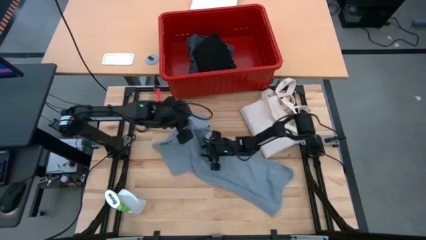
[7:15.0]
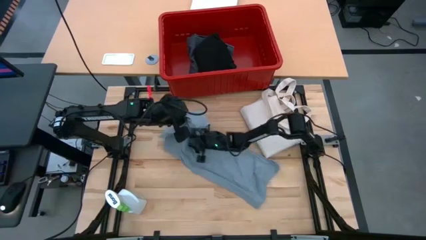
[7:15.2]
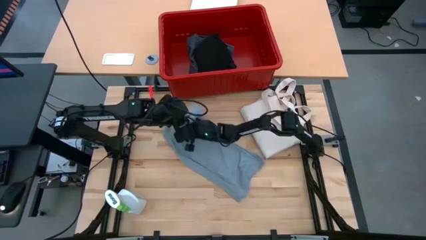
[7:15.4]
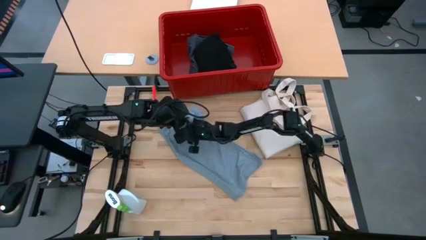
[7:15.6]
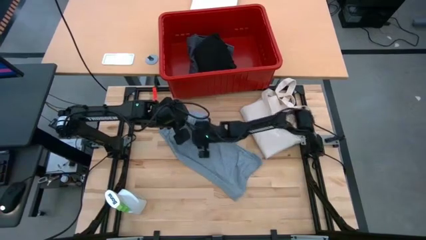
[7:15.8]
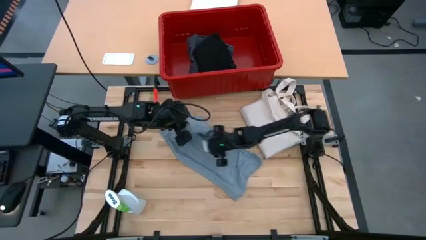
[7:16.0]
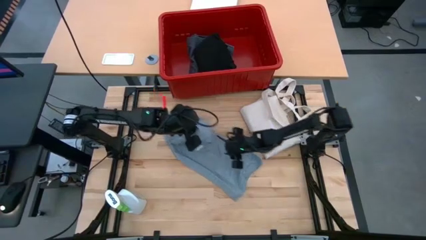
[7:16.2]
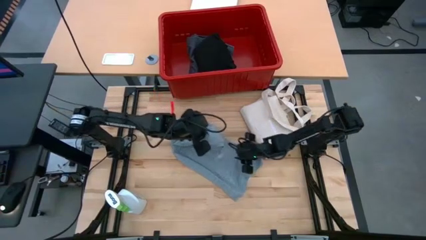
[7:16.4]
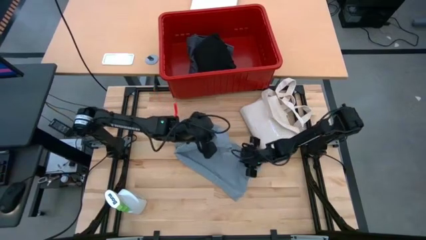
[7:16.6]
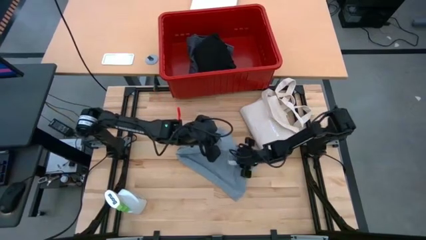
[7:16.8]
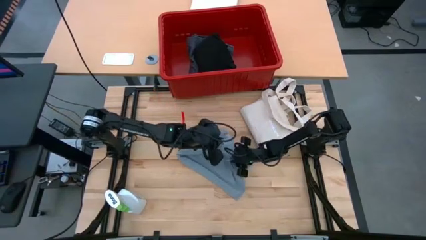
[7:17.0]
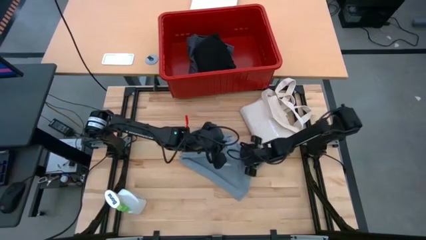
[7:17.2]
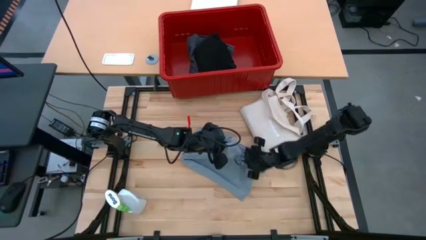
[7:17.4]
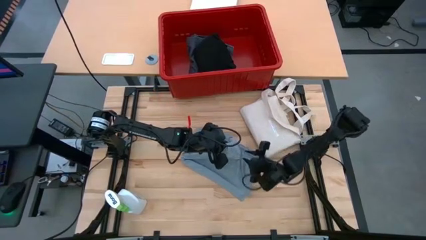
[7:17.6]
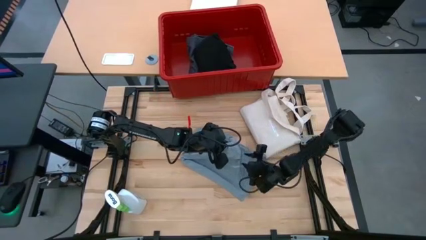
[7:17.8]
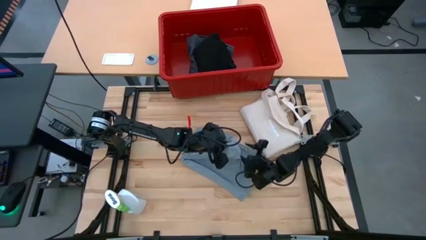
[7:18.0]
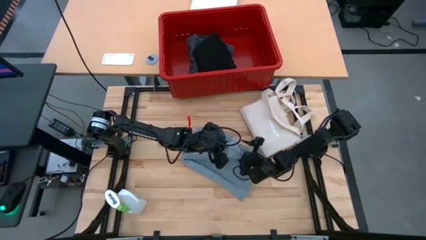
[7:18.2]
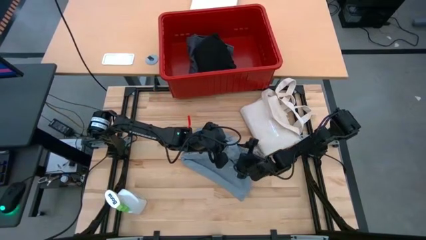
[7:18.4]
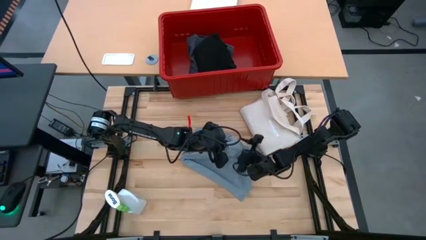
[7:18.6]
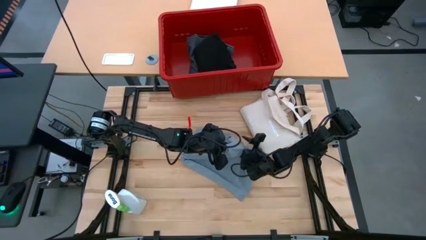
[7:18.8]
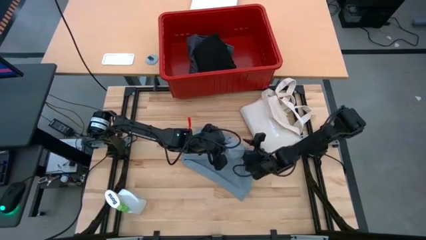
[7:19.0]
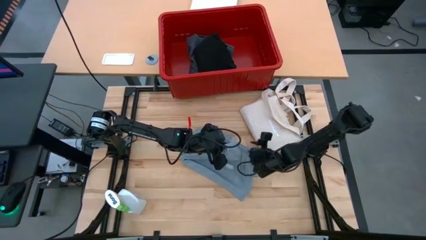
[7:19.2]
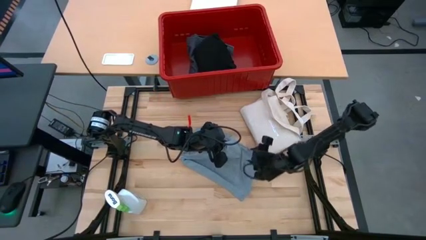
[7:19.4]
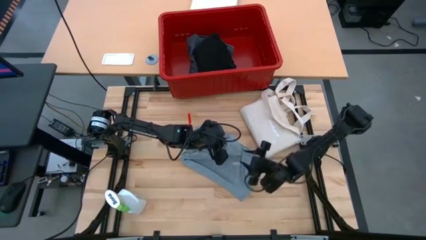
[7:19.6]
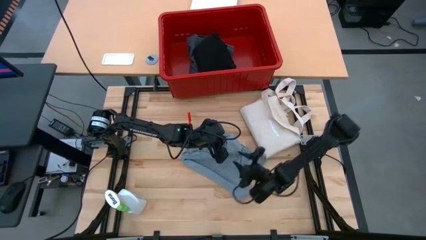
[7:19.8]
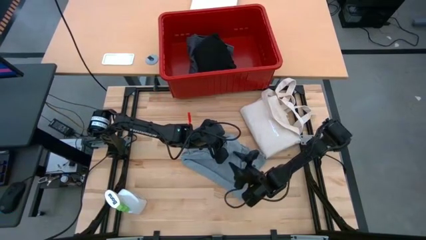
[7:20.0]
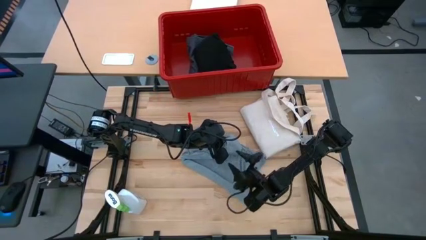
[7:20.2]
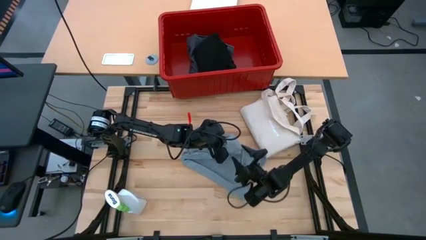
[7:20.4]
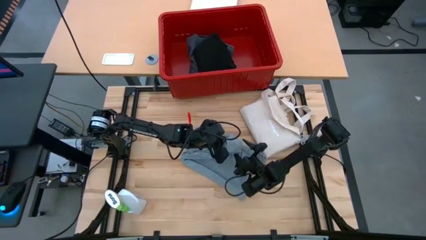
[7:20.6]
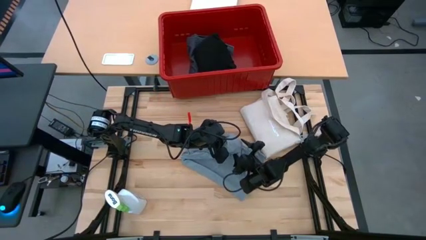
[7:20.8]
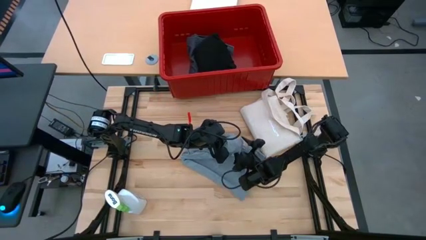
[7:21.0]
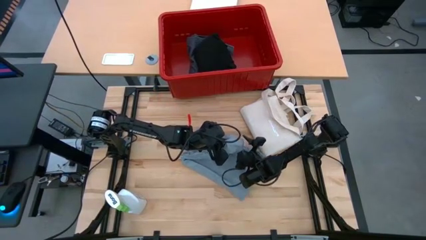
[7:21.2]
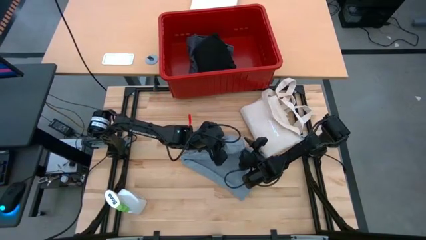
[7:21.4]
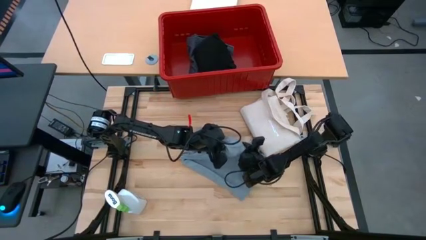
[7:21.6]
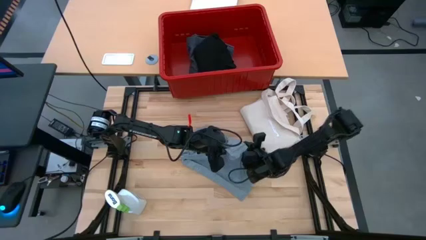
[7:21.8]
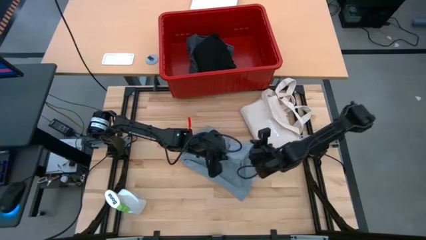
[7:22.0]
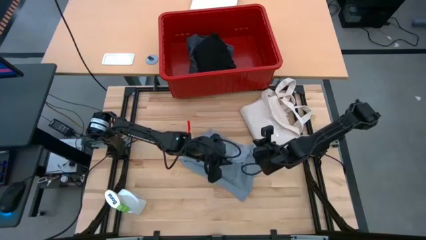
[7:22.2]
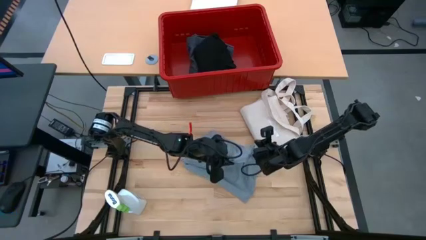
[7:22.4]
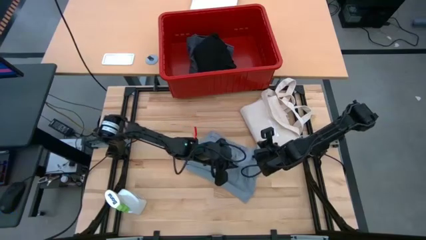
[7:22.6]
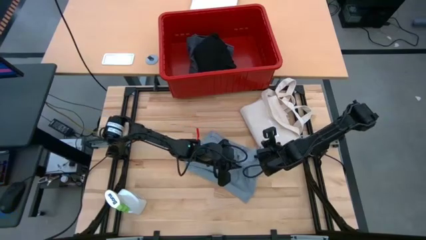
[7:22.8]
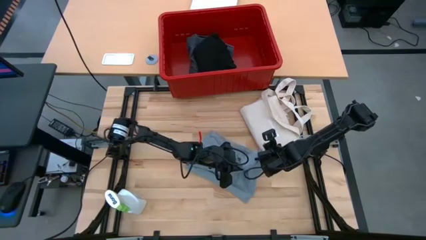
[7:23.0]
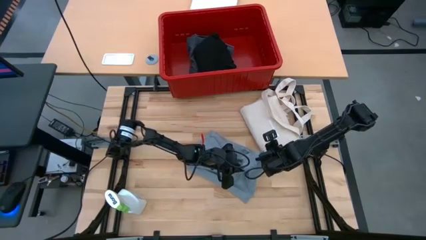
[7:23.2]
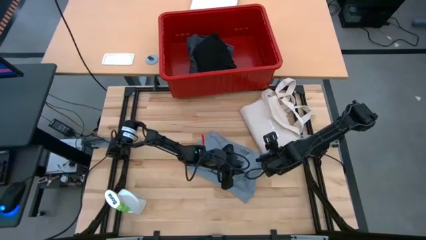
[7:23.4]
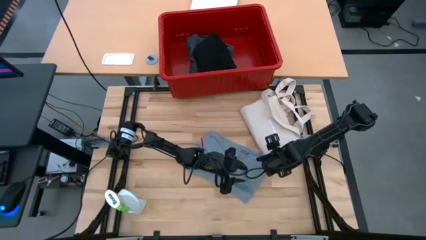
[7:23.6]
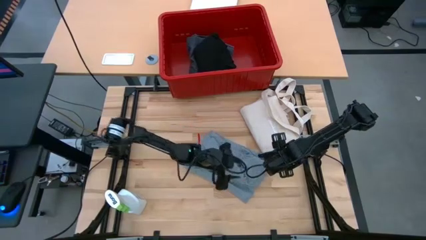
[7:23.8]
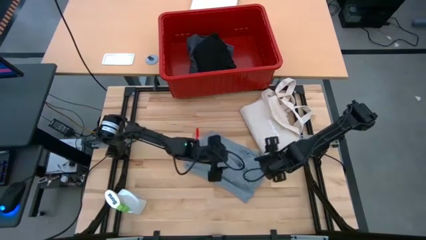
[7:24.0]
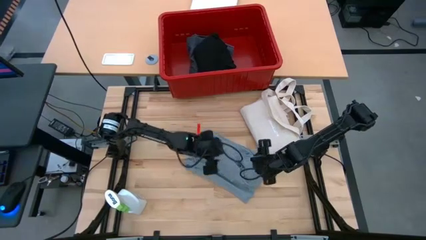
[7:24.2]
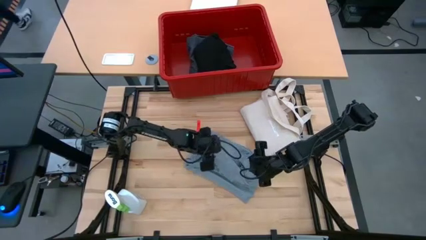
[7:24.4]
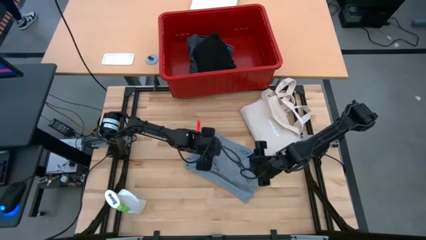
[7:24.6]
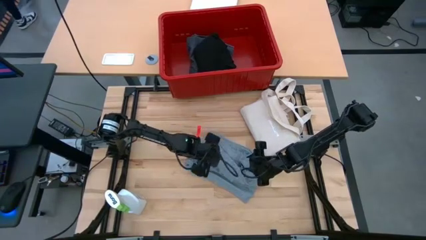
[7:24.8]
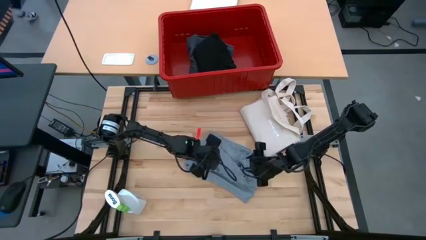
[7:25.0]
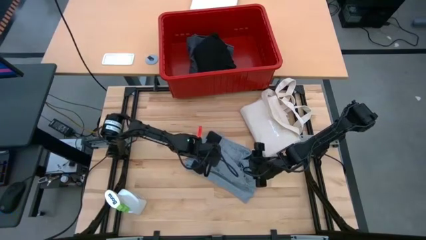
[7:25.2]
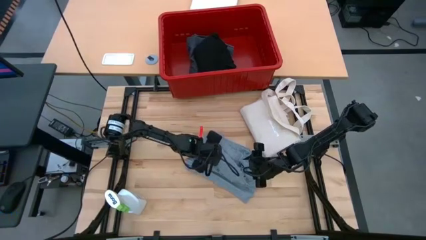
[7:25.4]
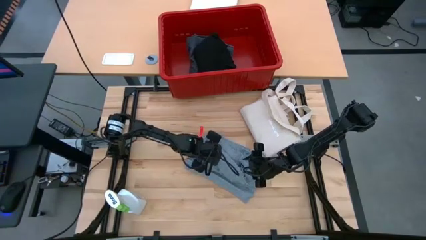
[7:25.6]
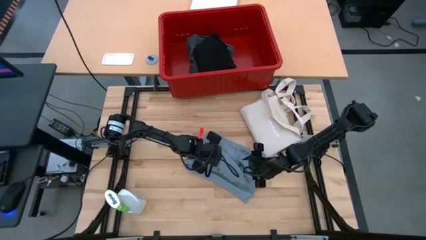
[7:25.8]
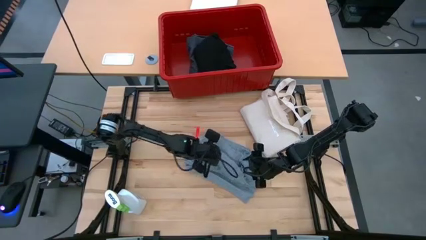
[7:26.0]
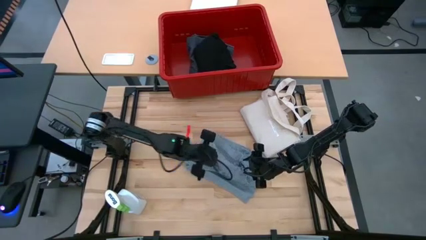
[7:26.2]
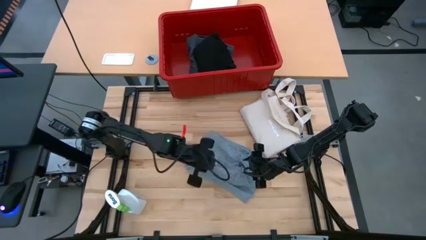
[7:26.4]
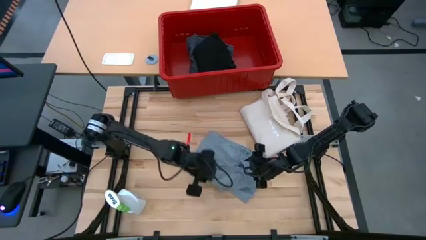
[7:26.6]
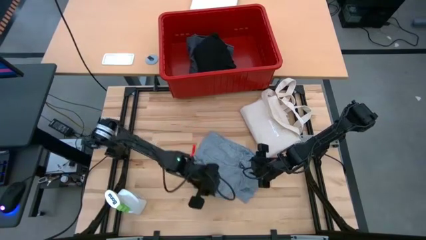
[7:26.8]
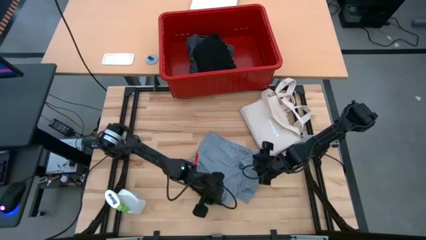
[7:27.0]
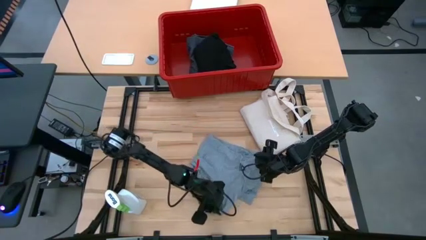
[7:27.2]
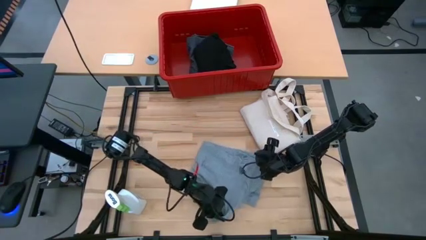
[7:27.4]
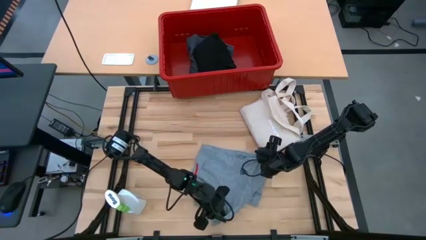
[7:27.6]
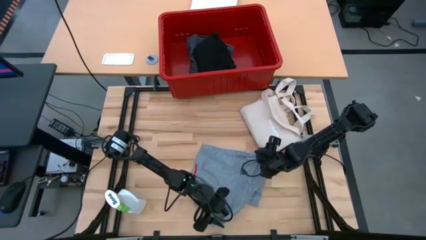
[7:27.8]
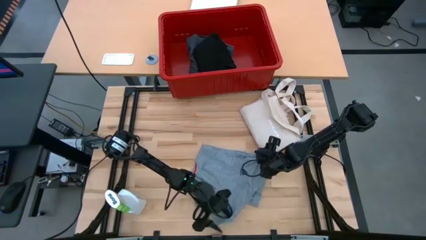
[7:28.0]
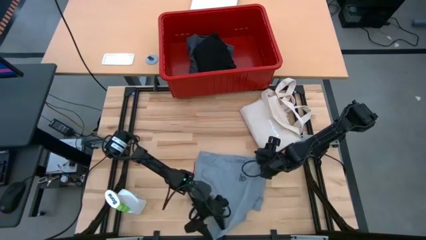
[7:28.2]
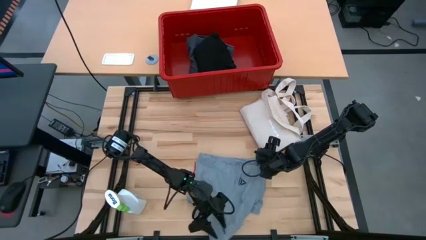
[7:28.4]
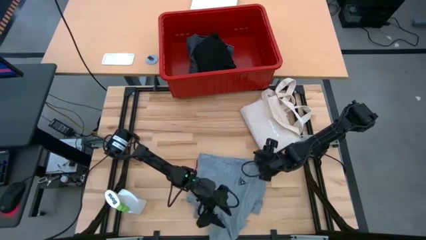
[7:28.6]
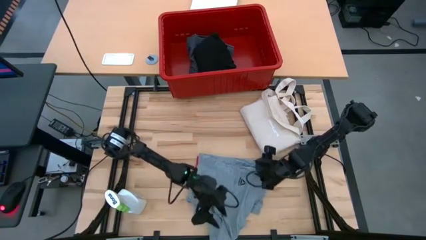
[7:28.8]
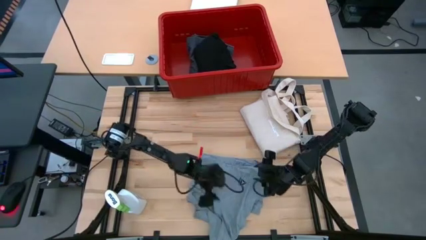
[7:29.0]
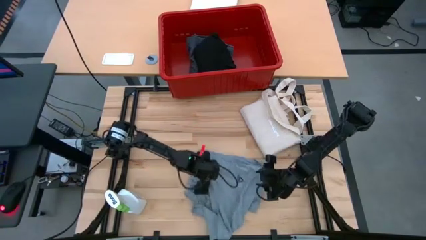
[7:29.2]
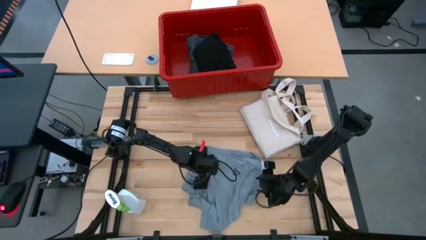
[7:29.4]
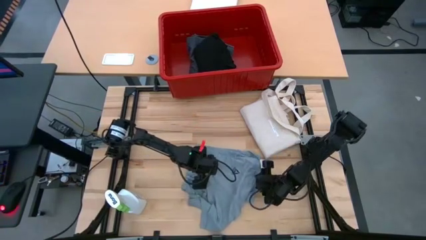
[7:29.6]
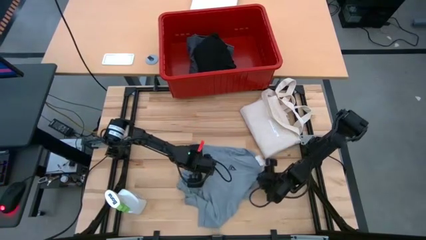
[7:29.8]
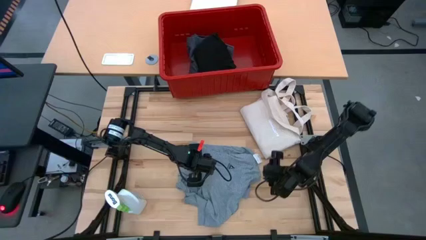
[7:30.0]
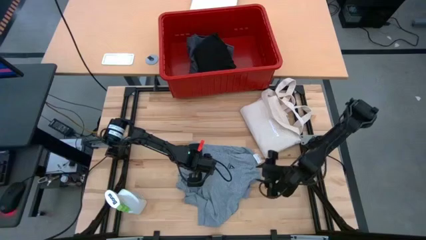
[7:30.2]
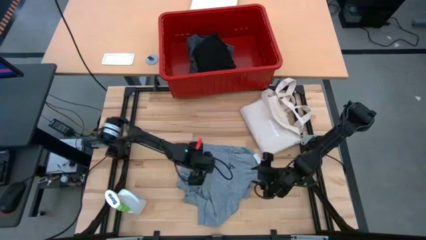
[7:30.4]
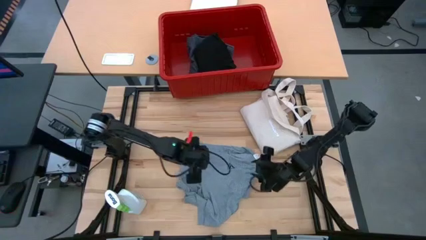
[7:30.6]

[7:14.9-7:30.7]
Task: Fold Laundry from Bin
Fold the gray shirt
